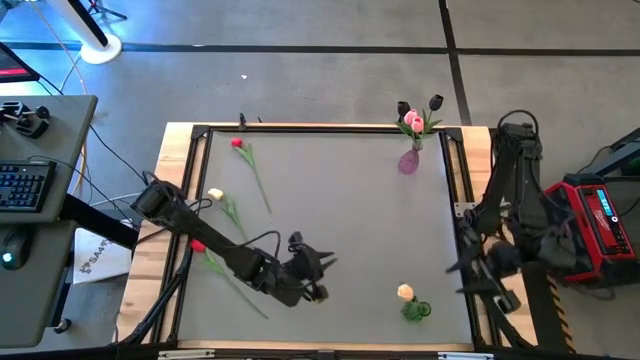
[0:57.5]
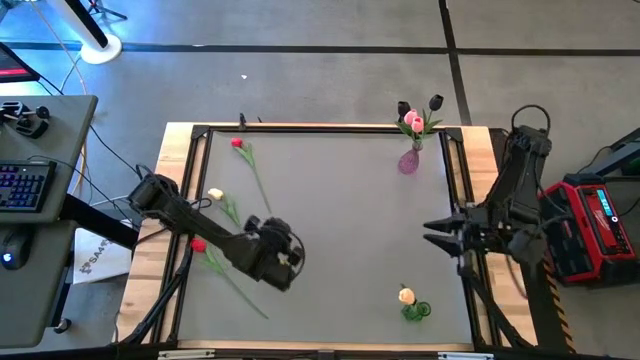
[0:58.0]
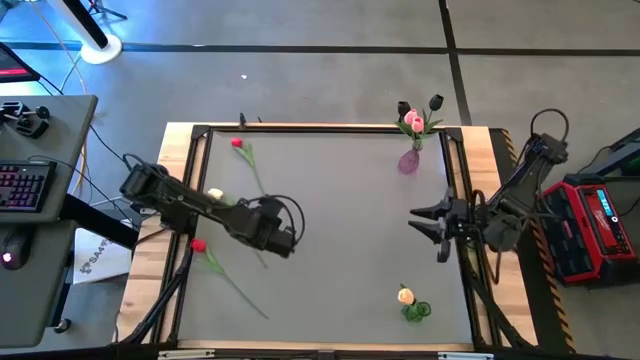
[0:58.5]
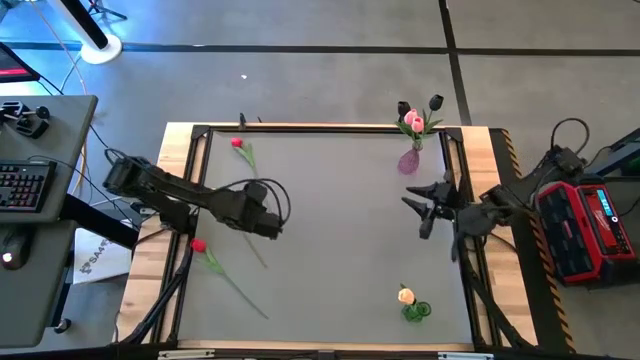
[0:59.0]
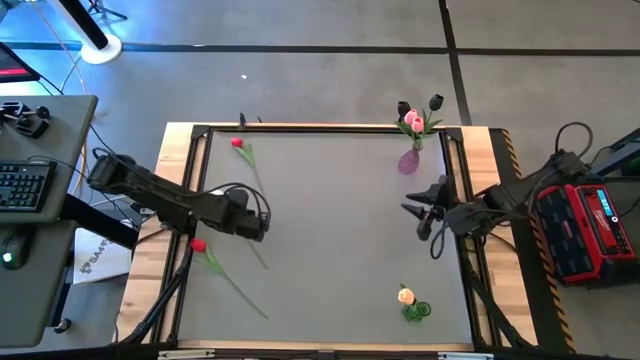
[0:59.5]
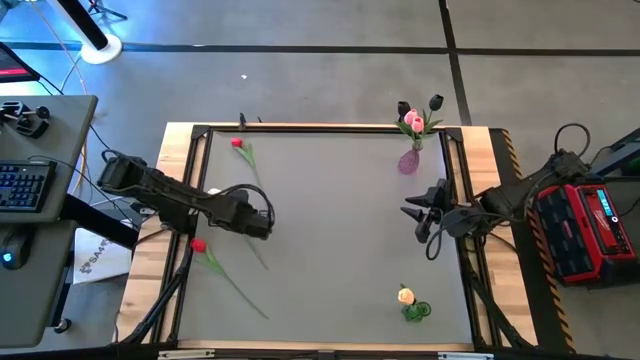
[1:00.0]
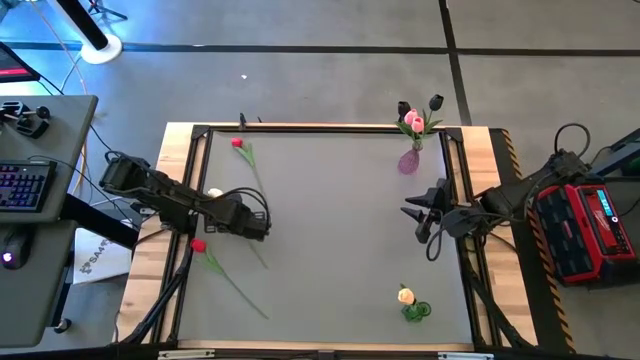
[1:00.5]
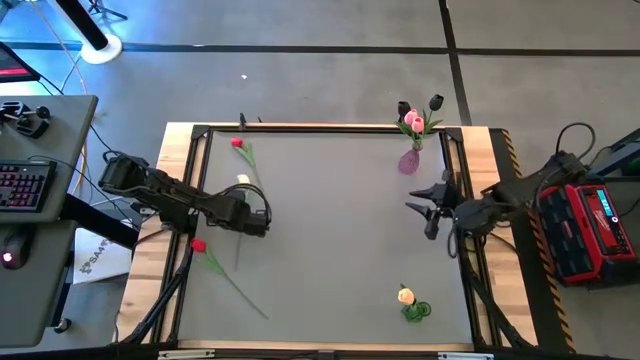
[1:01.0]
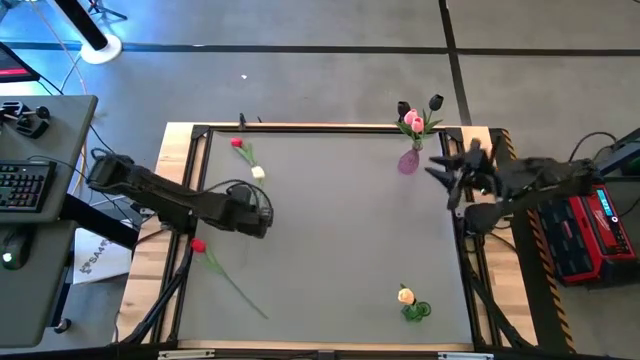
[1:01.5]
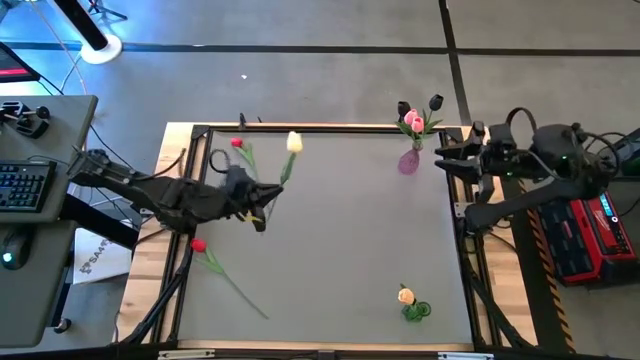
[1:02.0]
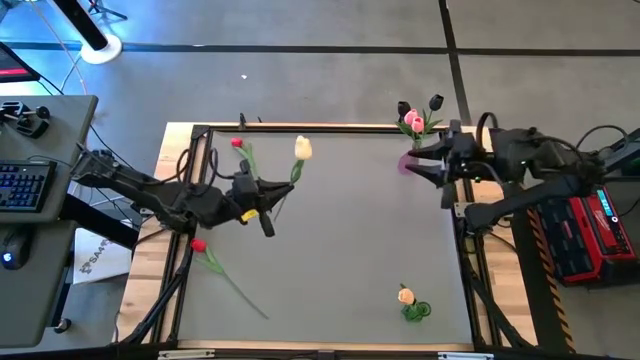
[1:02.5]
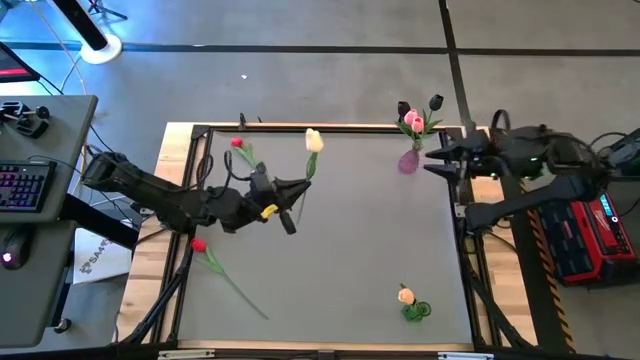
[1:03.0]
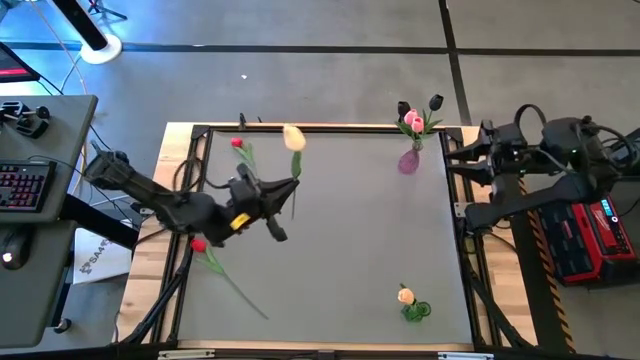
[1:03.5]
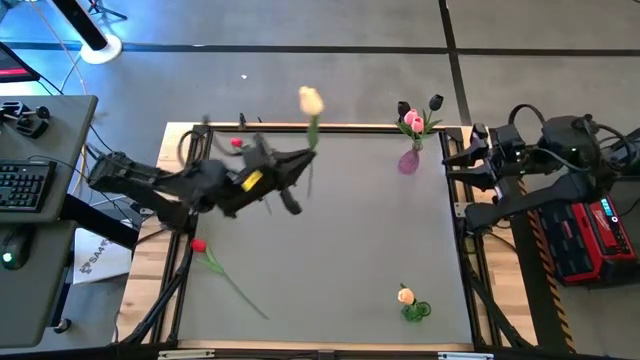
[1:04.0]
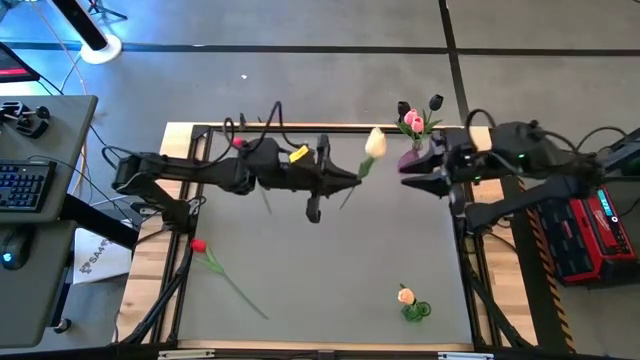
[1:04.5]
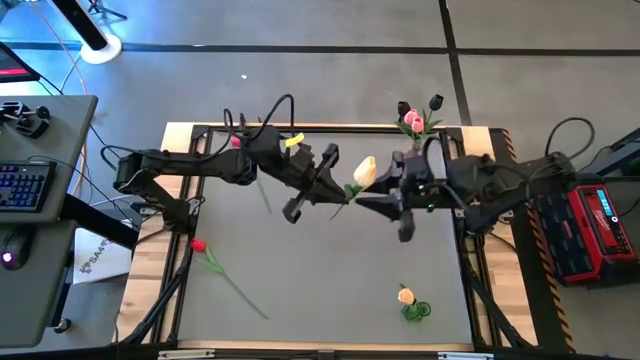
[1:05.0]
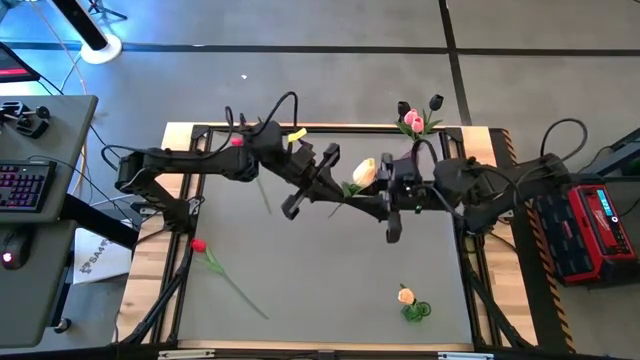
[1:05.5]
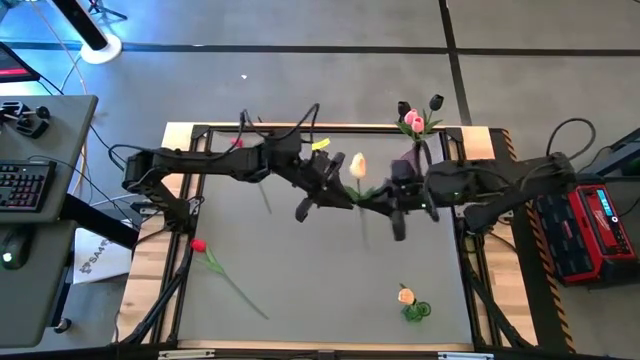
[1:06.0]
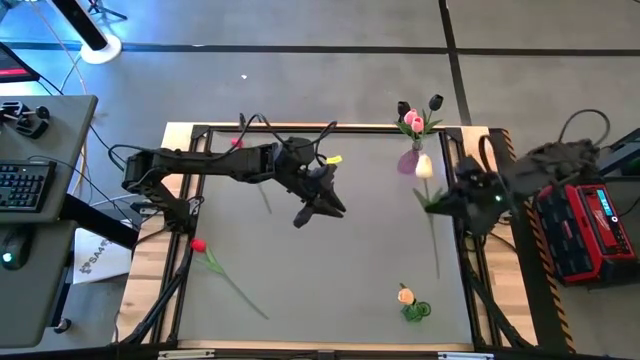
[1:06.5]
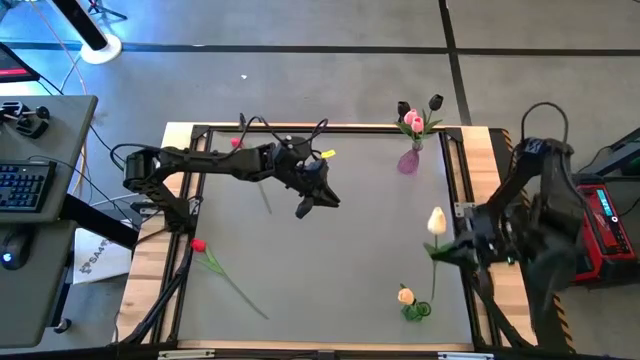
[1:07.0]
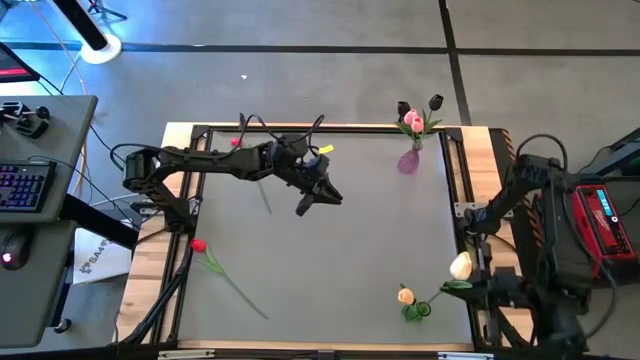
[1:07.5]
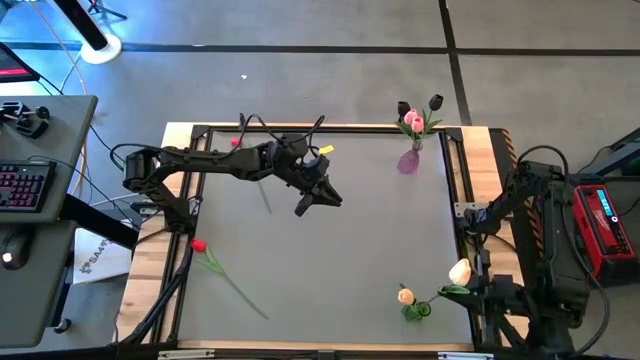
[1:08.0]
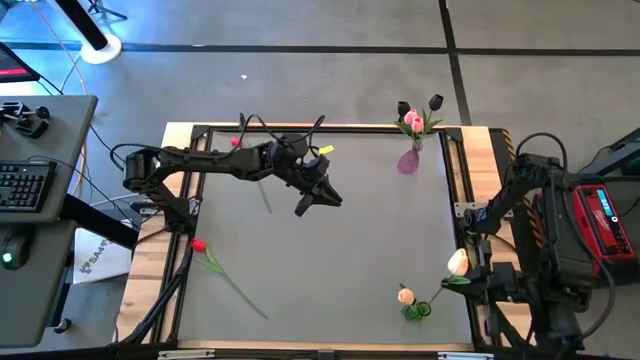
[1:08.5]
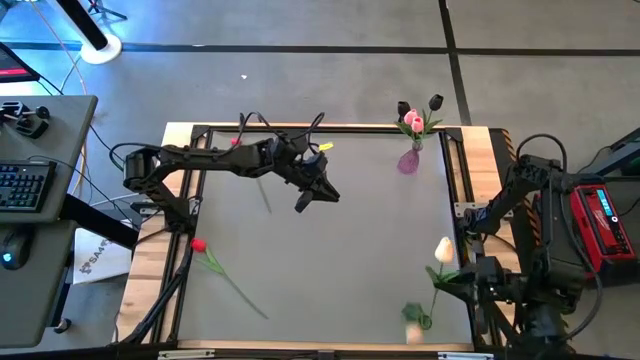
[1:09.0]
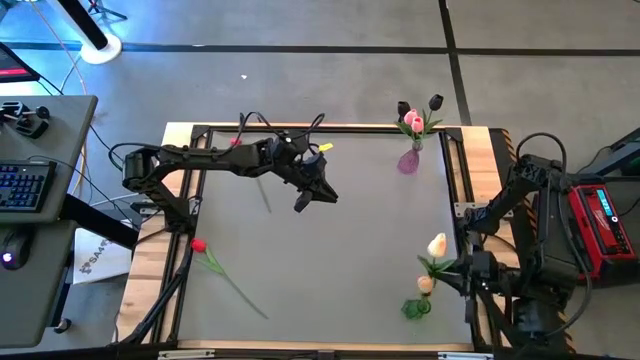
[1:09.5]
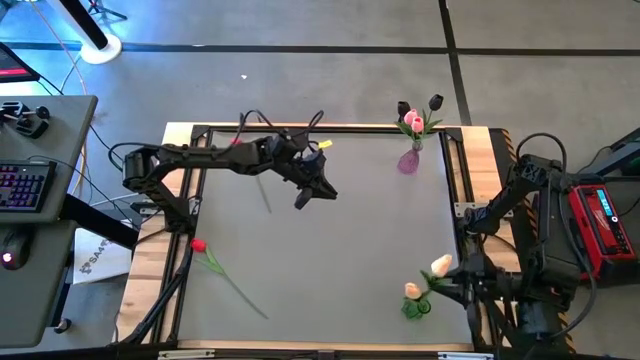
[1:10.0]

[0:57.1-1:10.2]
Task: Sort flowers into vase by color
Put the white tulip into the green vase

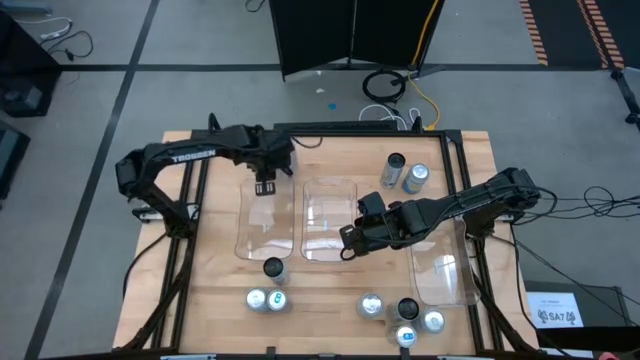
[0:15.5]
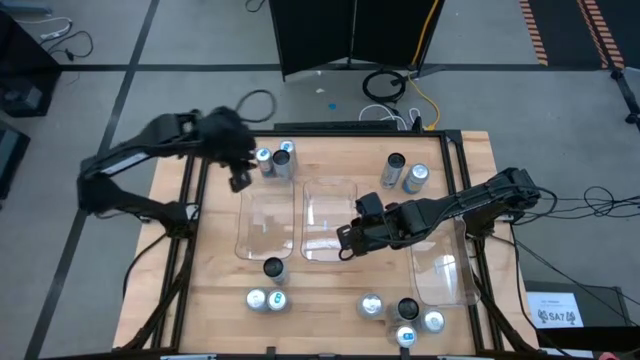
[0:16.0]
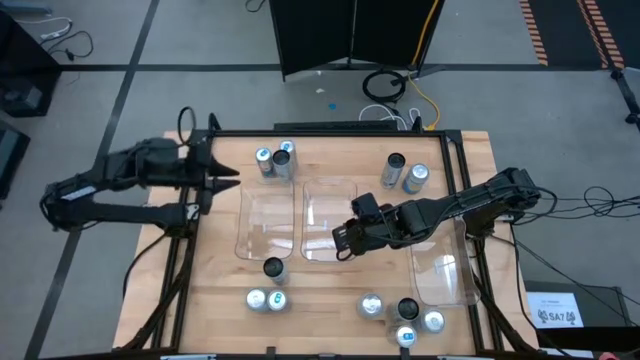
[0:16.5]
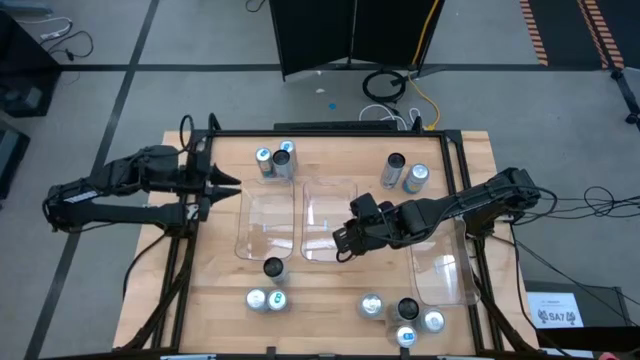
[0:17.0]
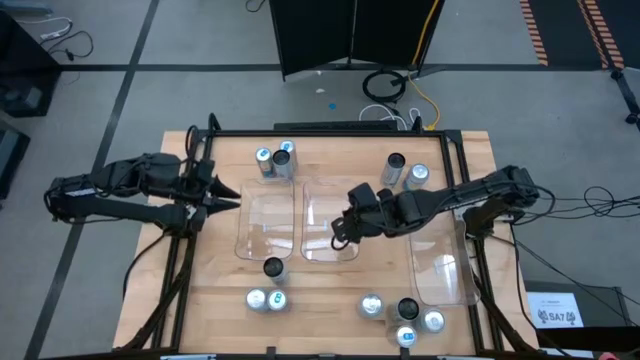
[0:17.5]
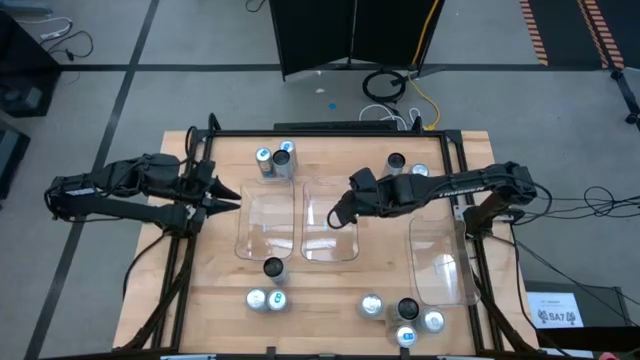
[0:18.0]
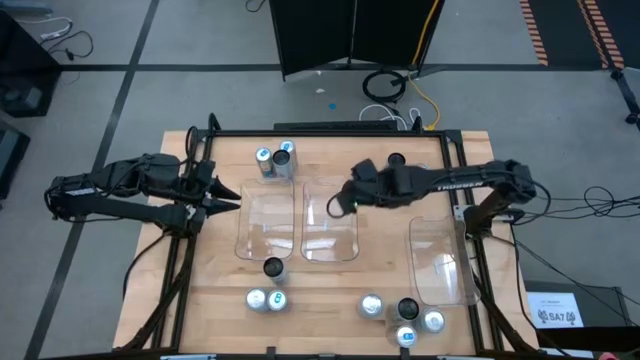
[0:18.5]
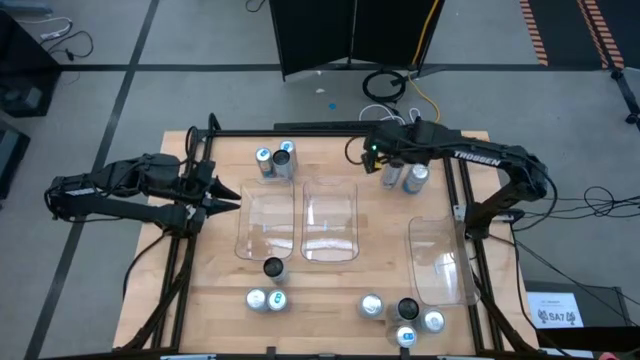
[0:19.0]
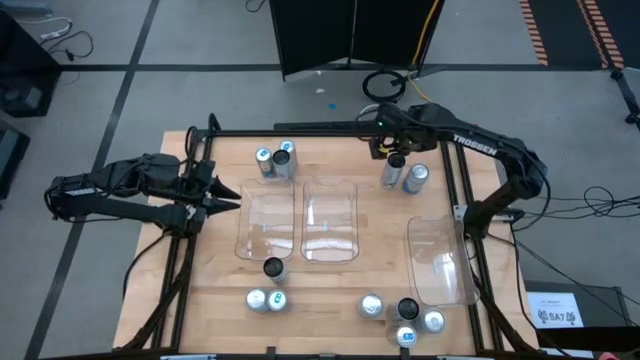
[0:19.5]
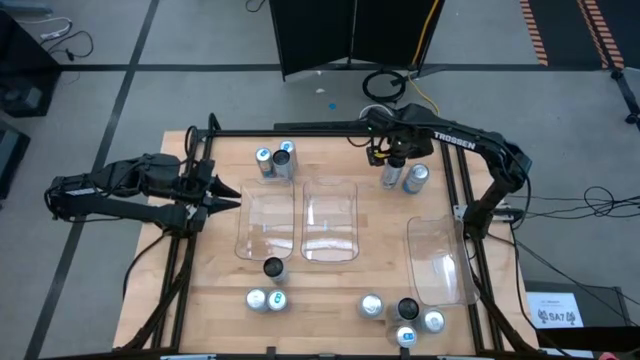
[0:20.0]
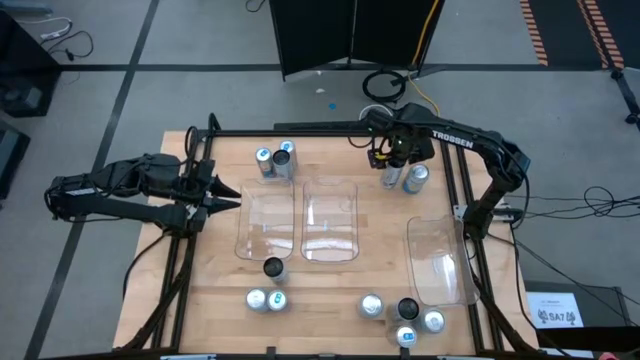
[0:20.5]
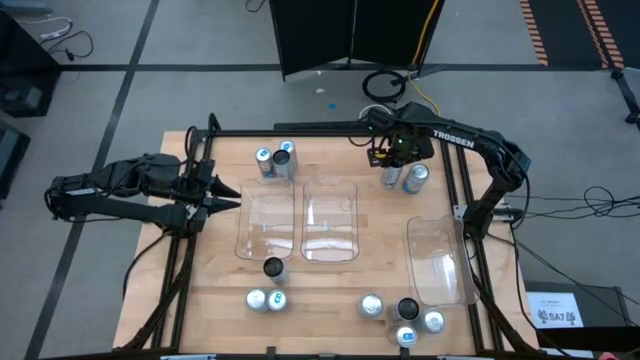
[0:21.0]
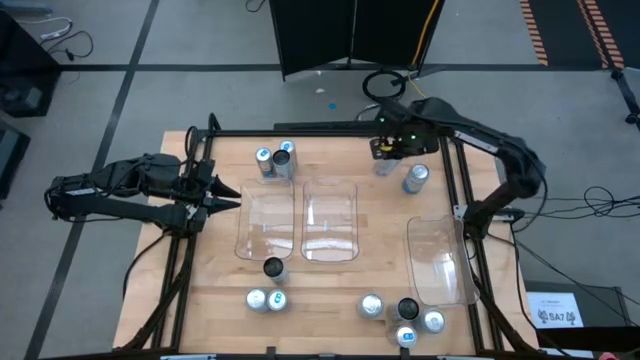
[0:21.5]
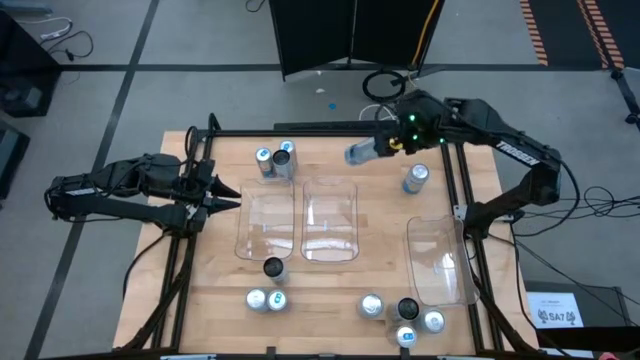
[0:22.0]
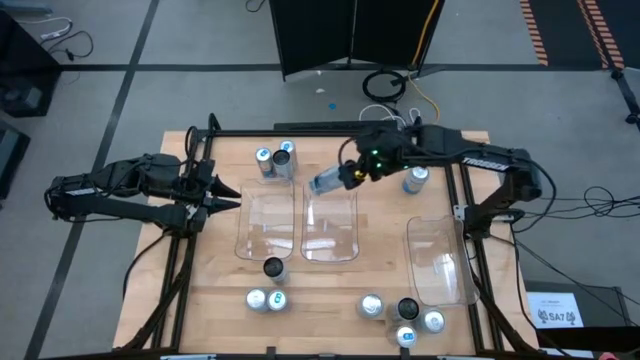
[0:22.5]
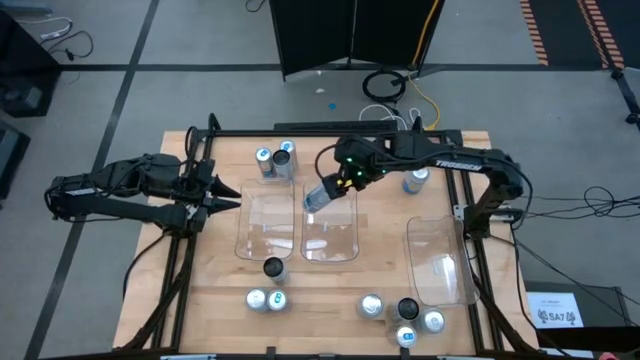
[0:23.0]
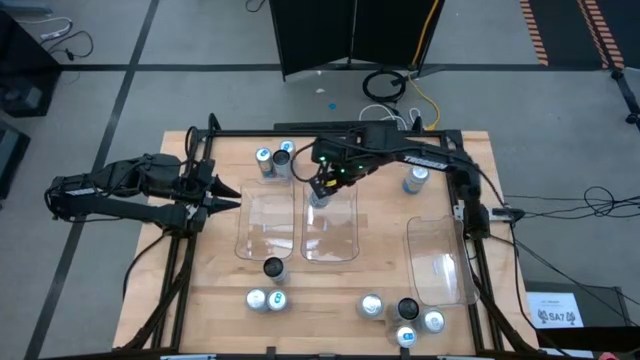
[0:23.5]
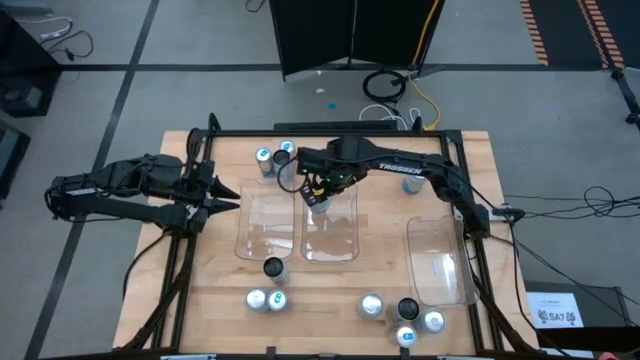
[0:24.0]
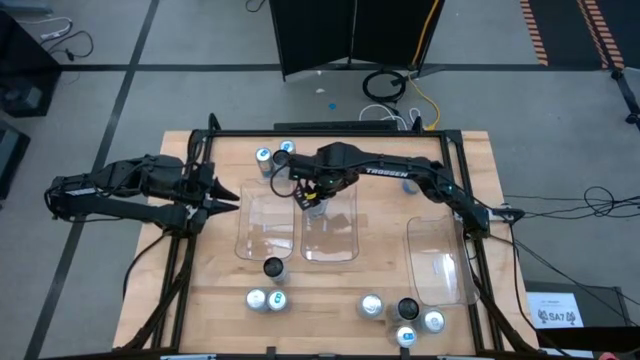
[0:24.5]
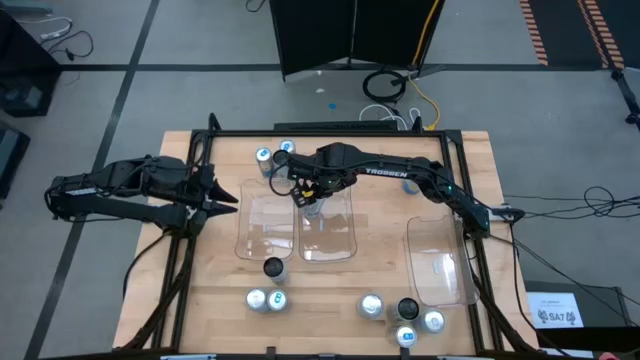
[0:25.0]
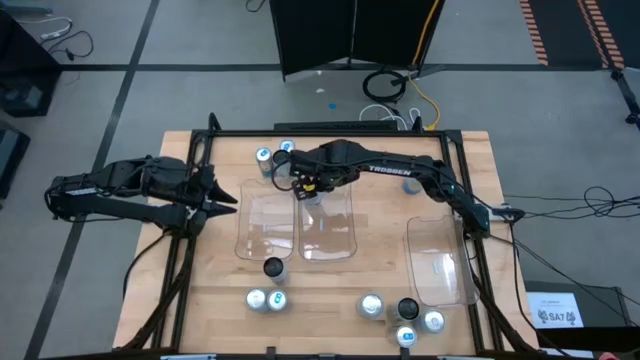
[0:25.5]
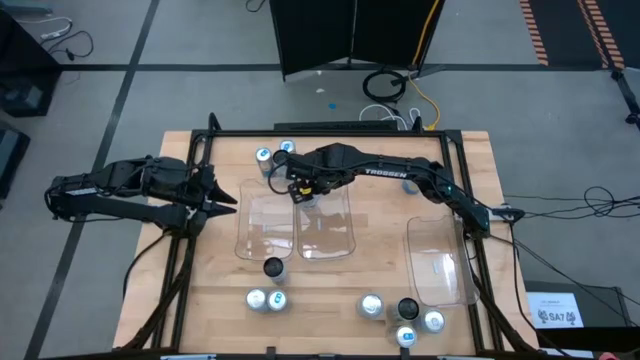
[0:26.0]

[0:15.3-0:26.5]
Task: Sort soda cans
Put the top right white-blue soda can into the middle transparent bin
